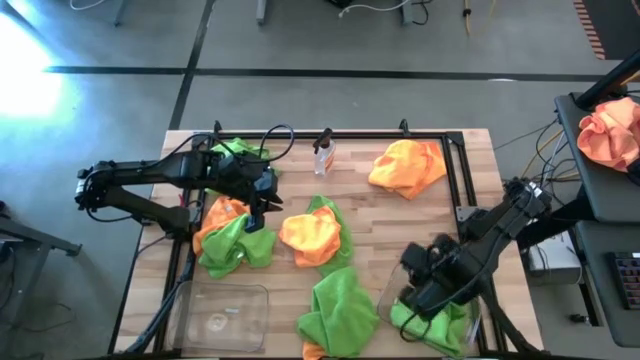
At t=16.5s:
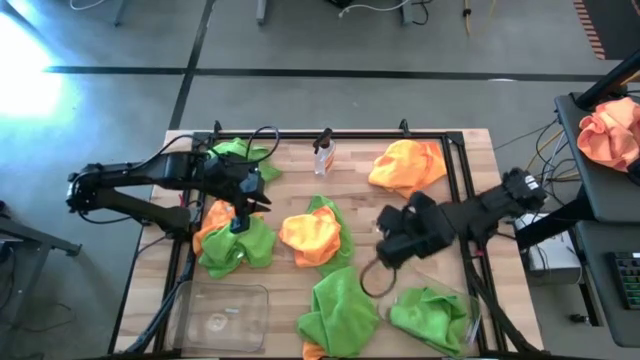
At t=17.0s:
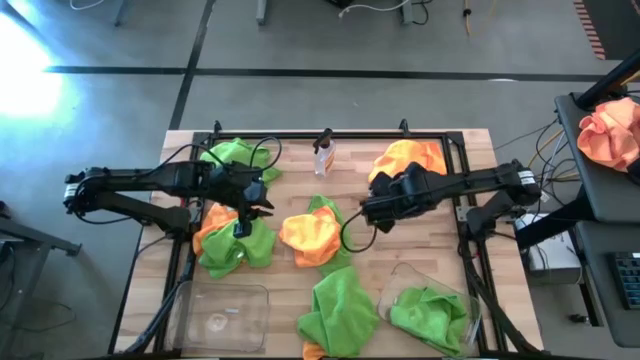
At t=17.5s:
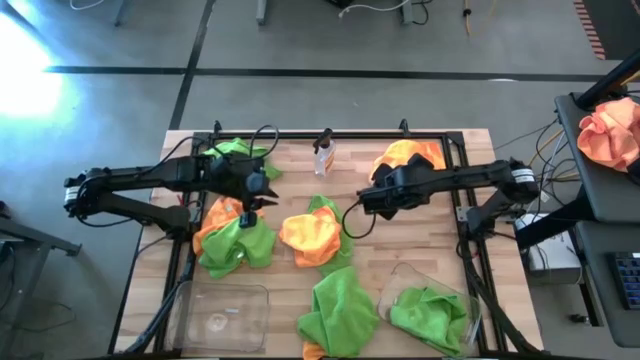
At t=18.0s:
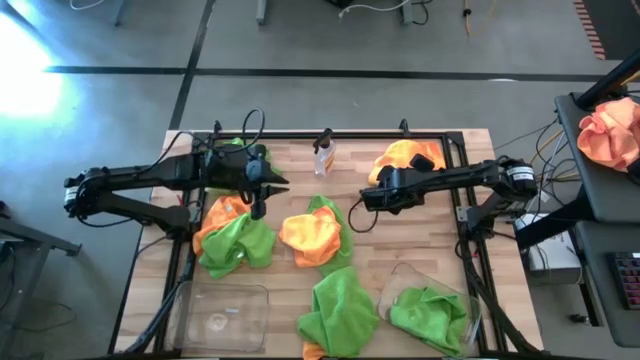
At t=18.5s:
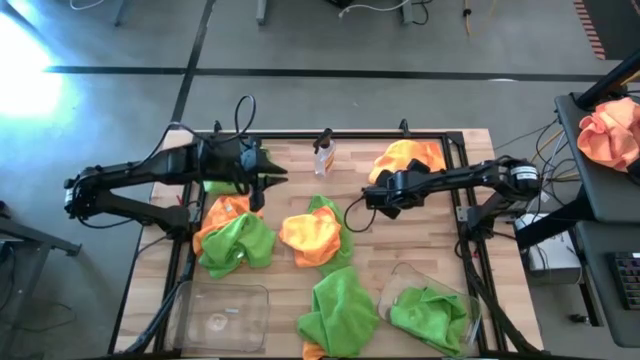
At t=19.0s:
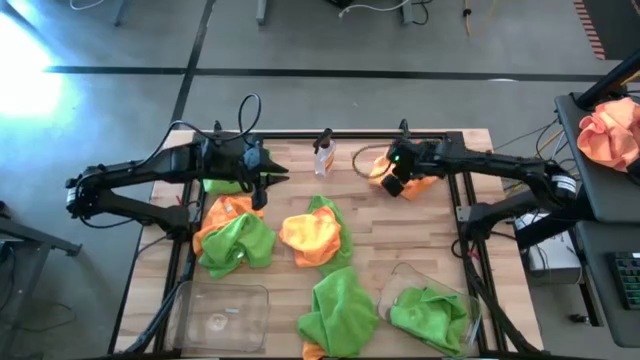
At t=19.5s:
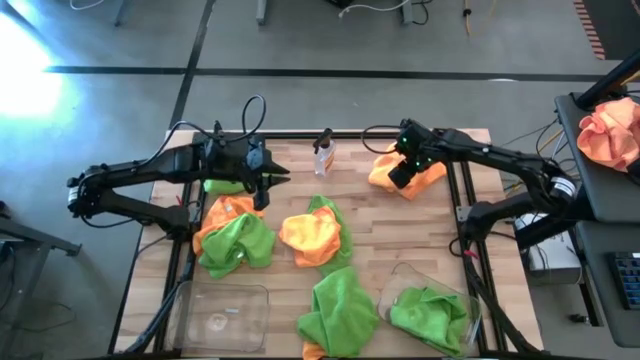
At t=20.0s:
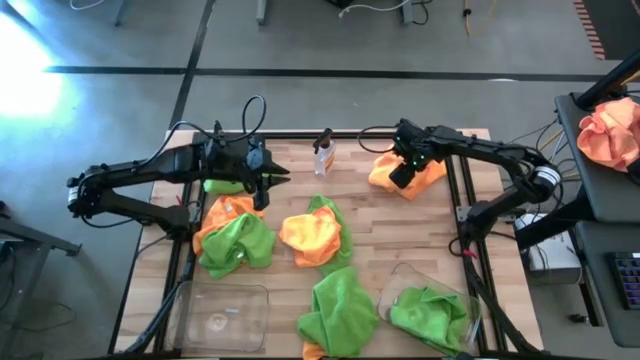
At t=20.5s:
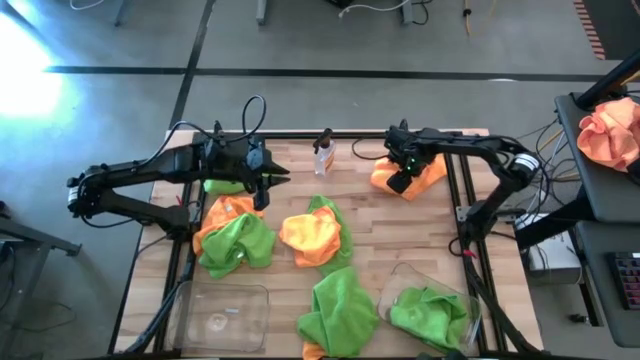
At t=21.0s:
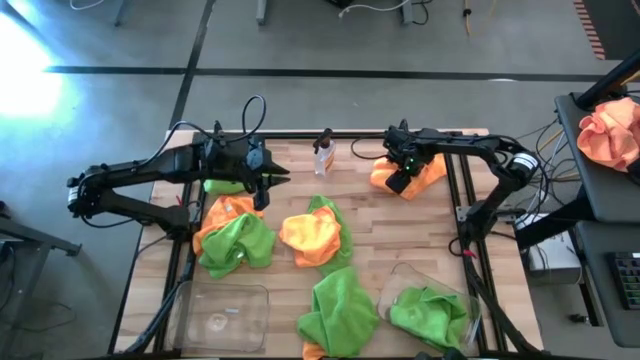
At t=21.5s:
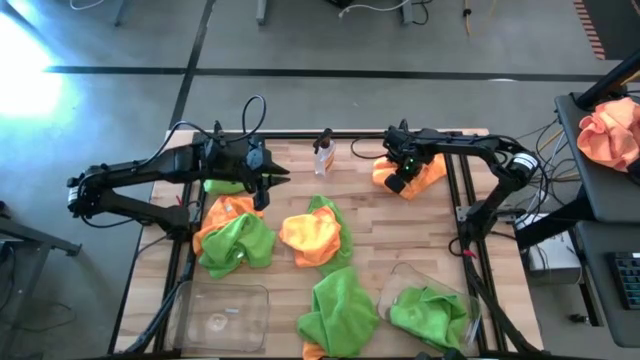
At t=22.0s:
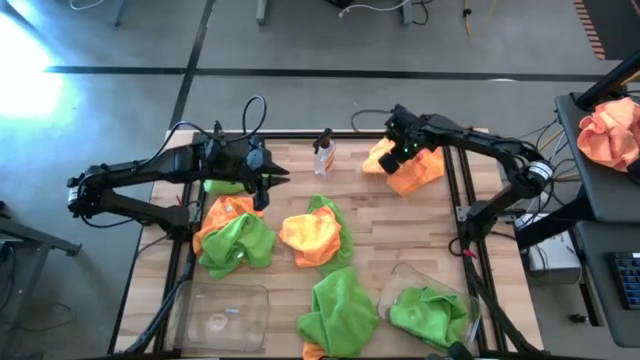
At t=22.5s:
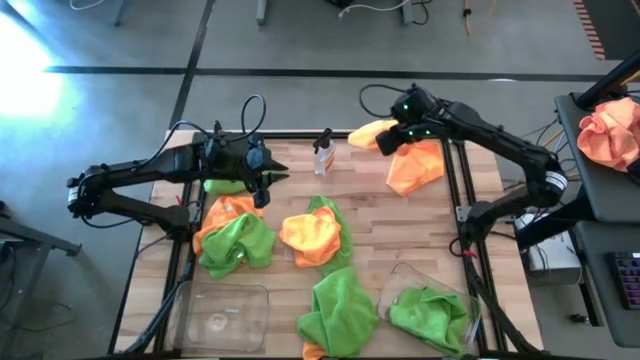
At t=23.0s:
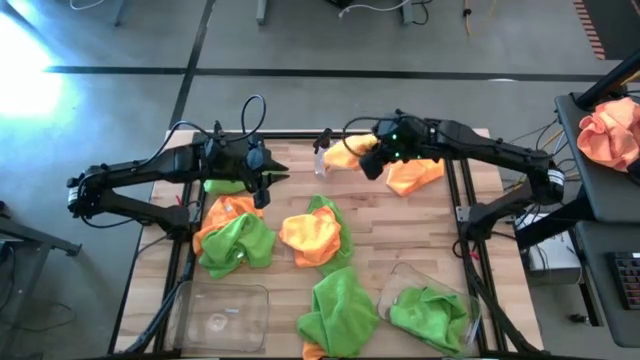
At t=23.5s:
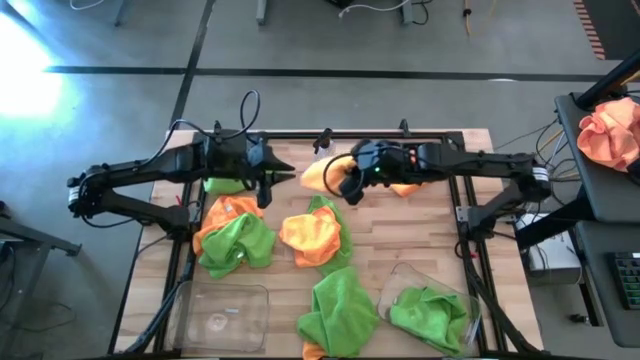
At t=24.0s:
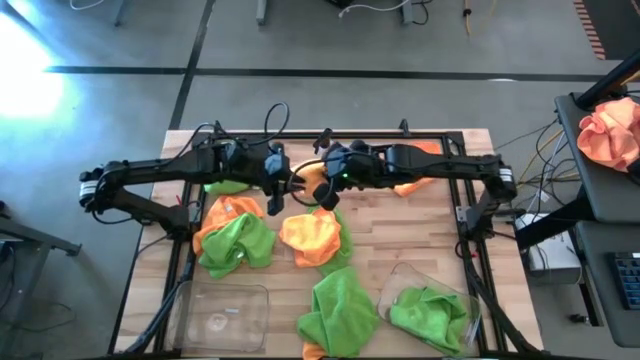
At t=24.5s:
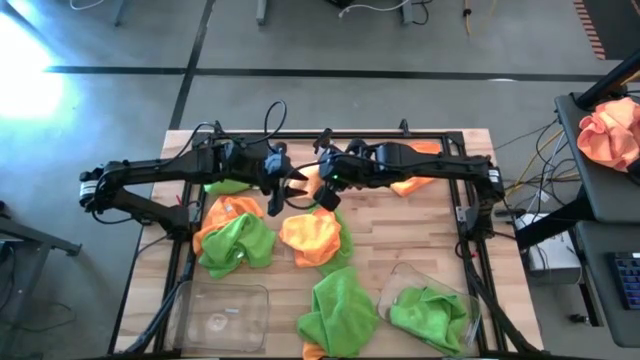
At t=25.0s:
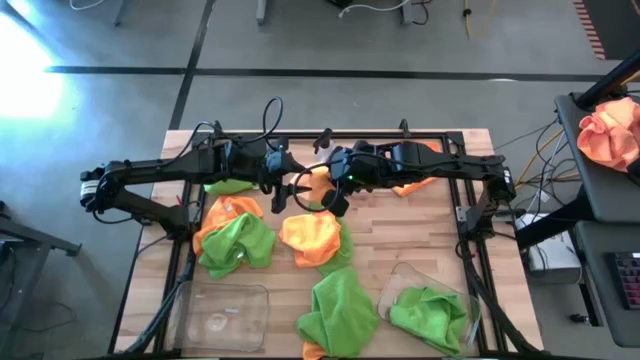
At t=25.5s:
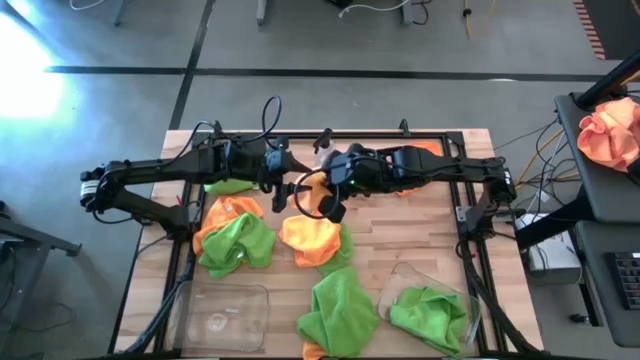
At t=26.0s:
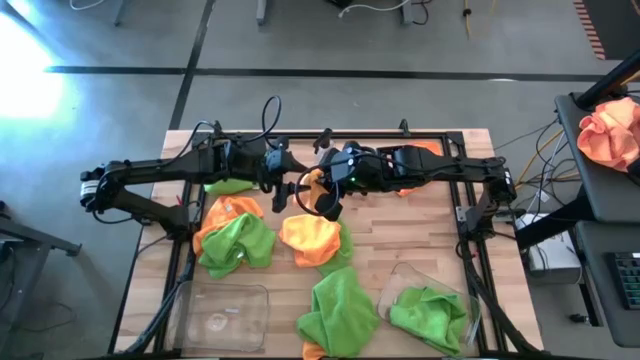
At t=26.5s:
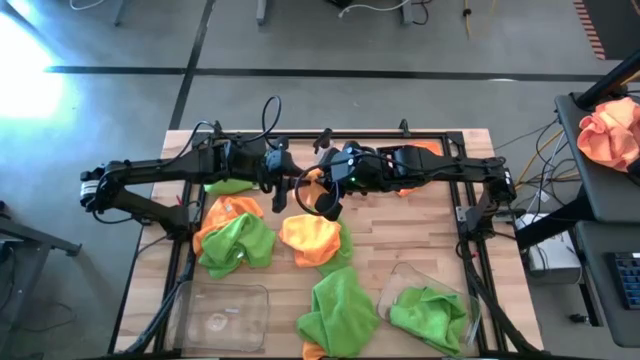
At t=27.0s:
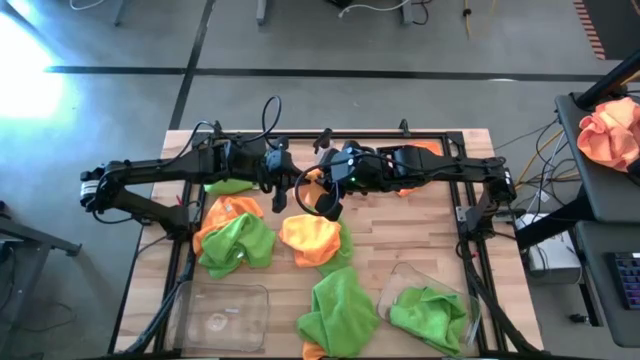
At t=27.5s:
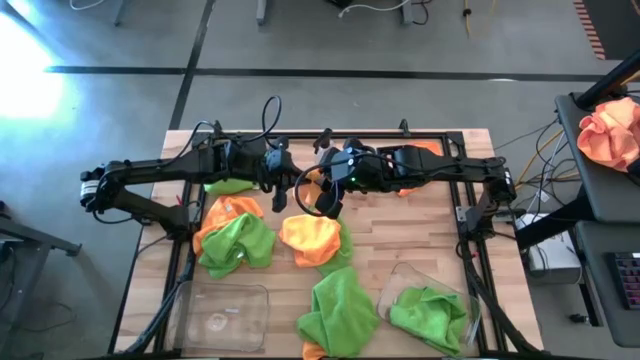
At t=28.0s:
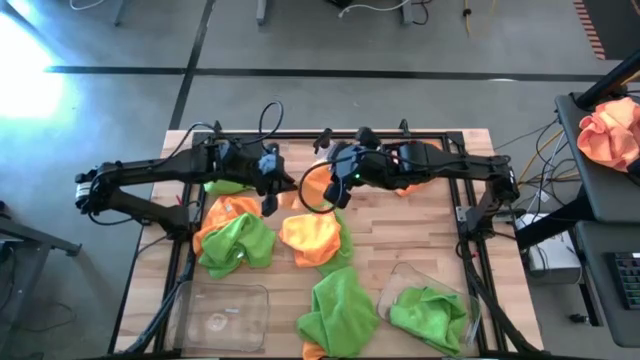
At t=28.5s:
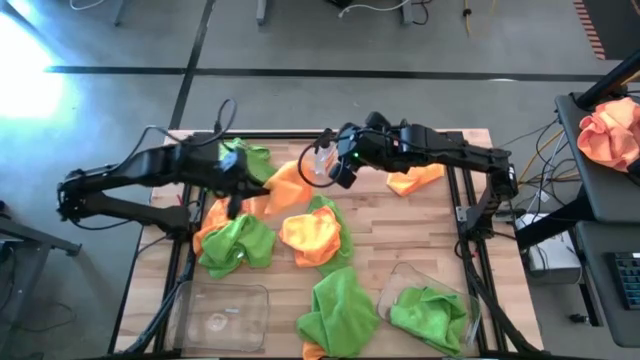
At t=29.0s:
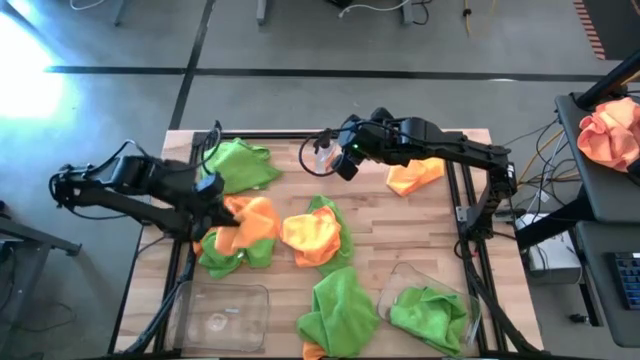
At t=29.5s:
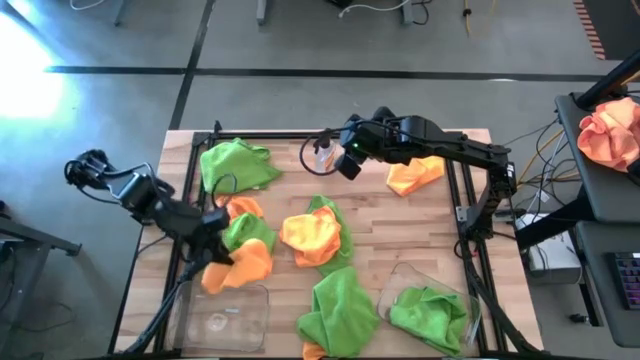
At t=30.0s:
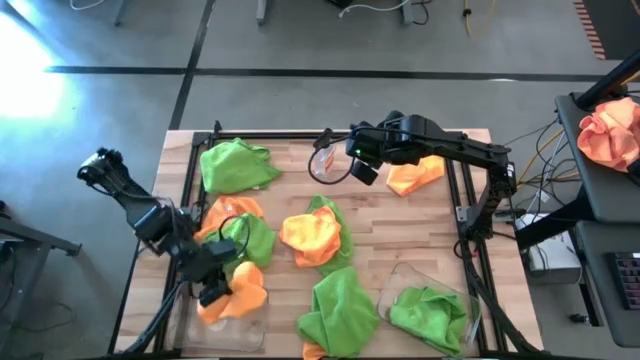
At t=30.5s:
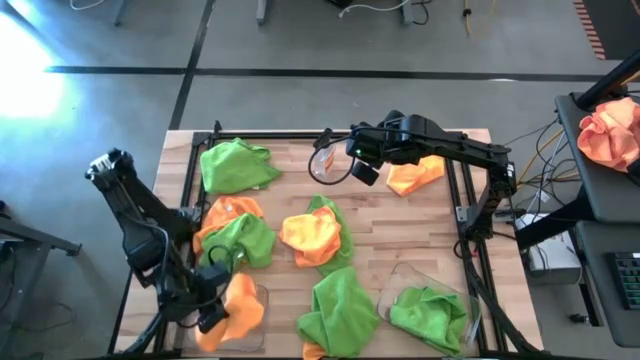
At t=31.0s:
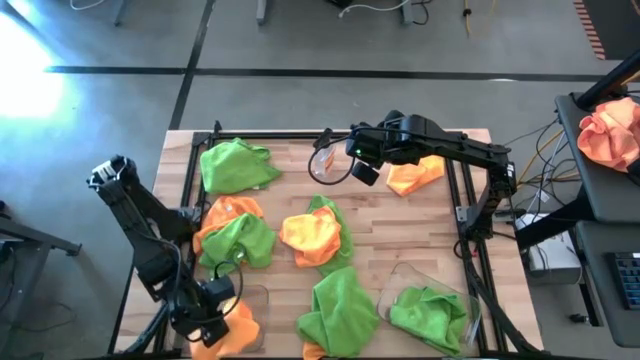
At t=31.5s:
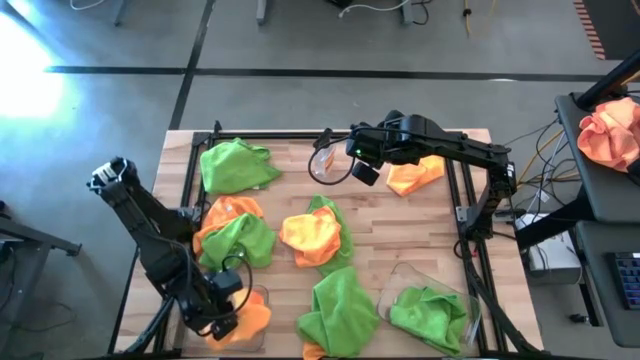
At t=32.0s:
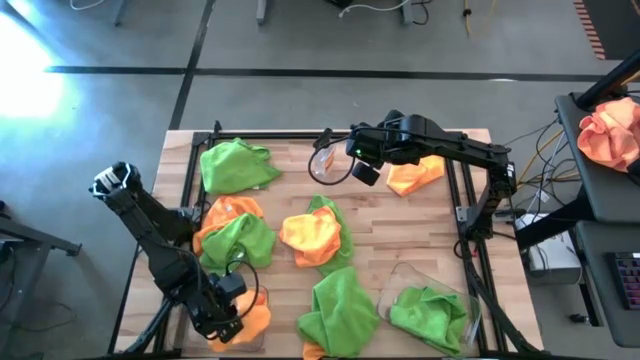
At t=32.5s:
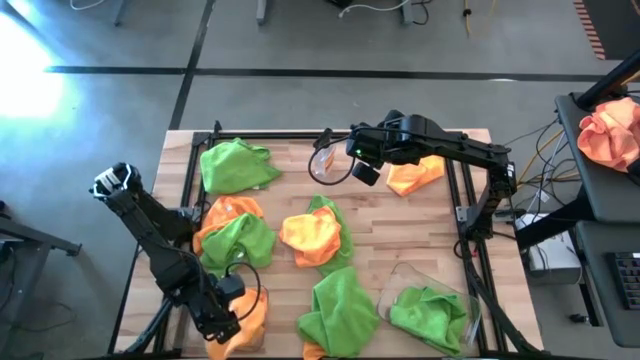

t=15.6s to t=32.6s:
Task: Sort microfiber towel by color & place in baskets
Put the orange microfiber cloth into the left transparent bin

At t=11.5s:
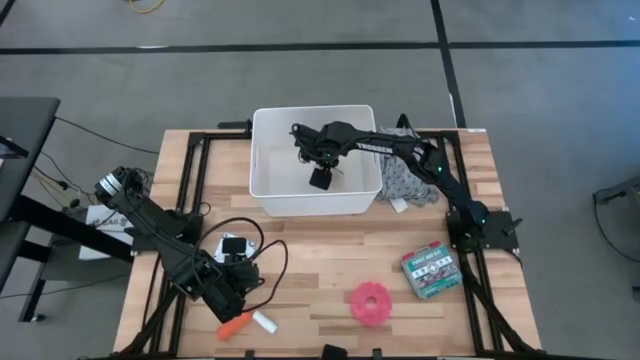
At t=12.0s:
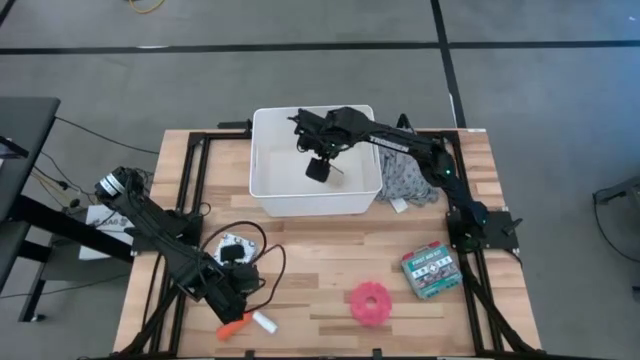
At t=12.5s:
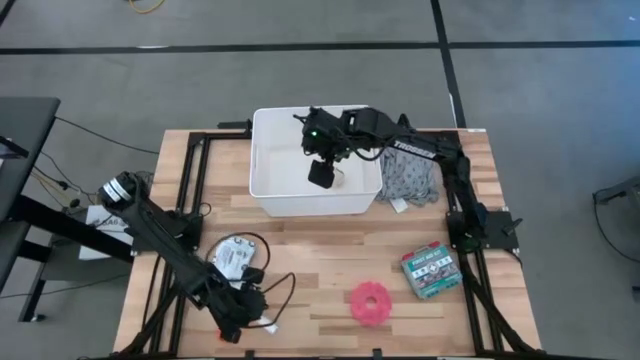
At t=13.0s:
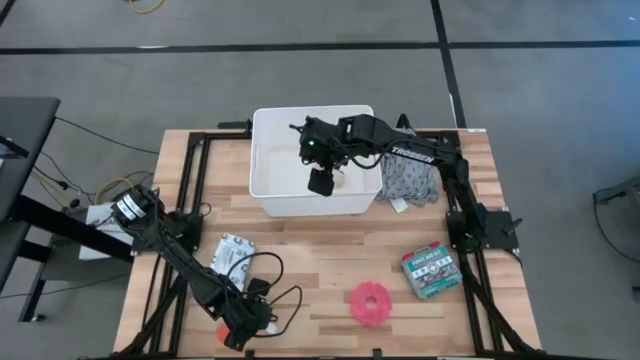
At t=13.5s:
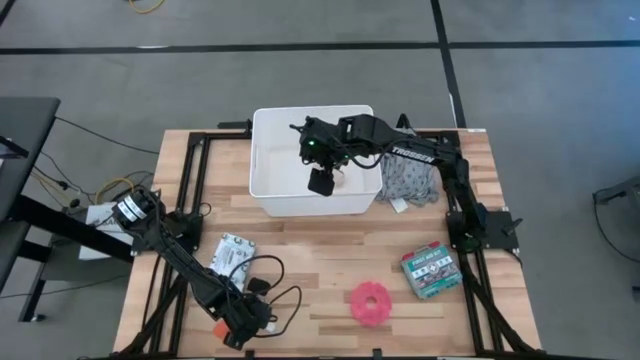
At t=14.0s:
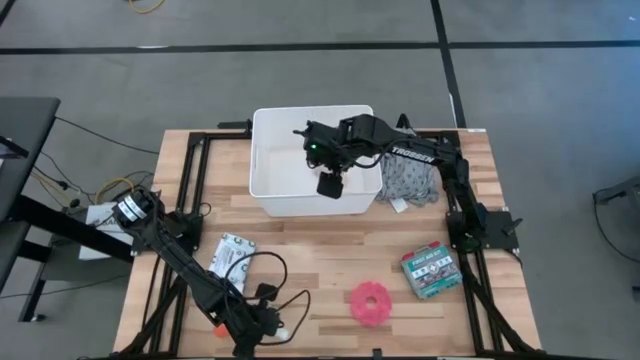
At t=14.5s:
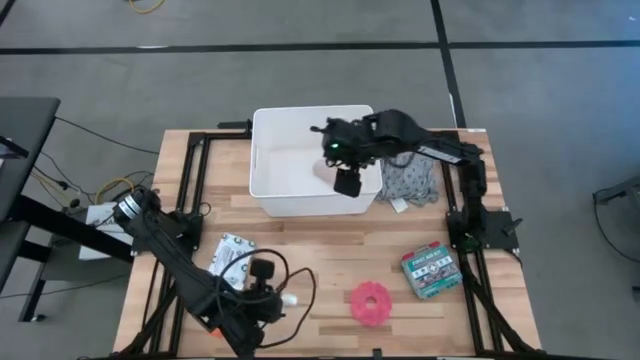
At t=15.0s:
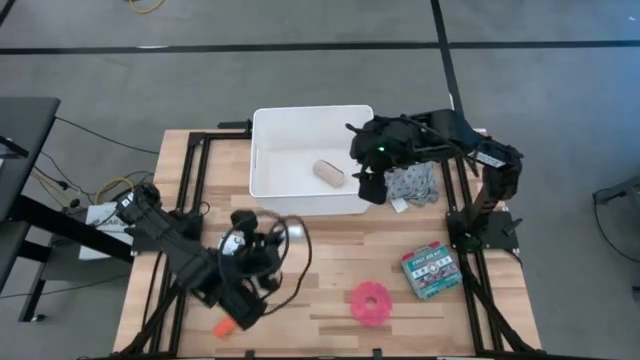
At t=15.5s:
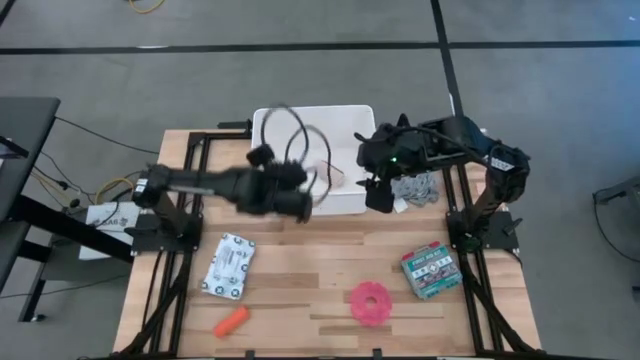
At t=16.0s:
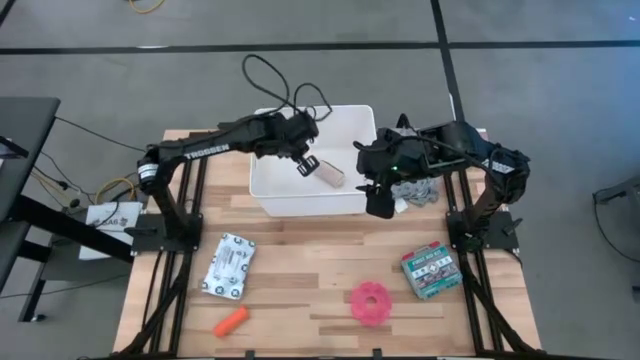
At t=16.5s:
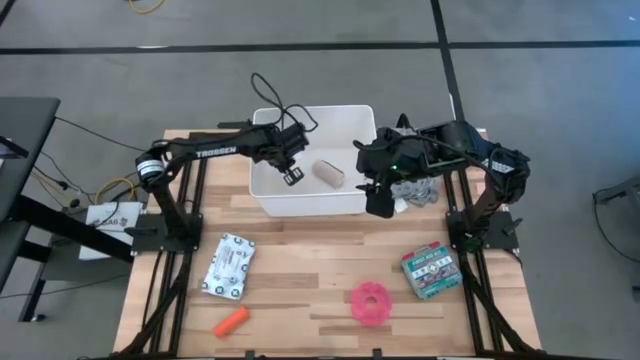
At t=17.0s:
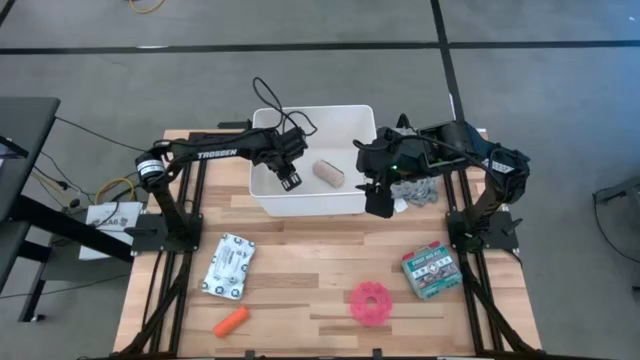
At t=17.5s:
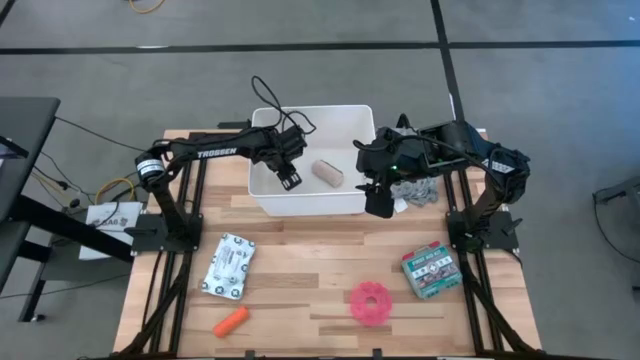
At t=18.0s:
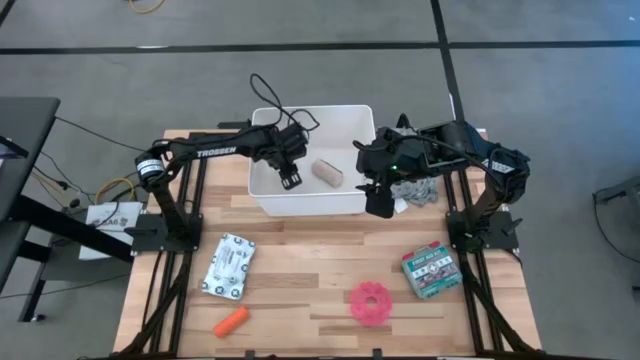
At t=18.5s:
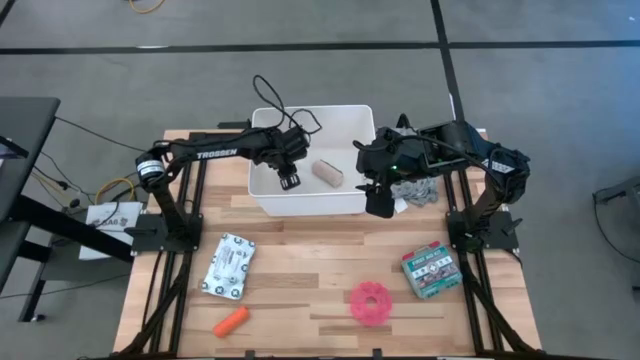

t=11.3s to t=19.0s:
Task: Pick & place medical supplies in basket/bin
Put the white gauze into the white bin
